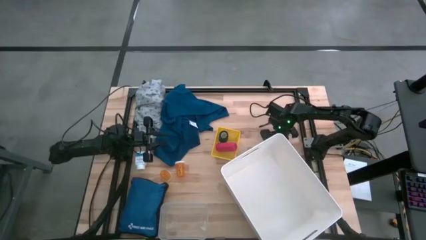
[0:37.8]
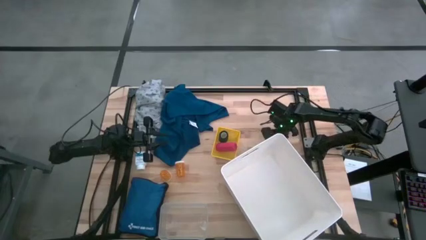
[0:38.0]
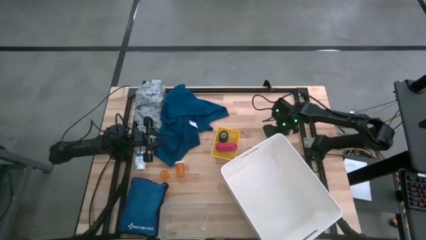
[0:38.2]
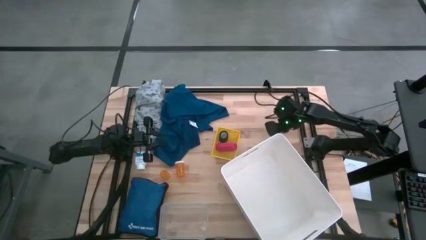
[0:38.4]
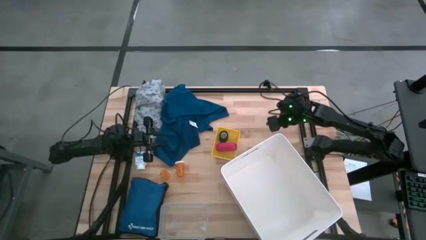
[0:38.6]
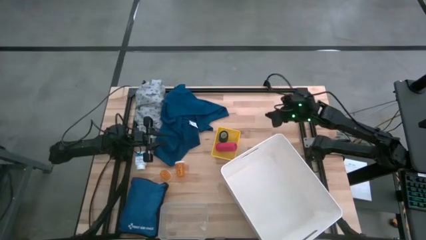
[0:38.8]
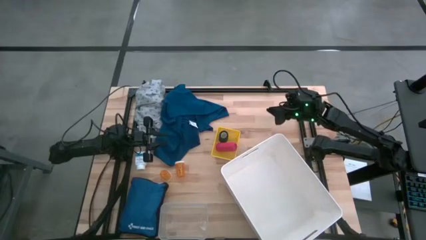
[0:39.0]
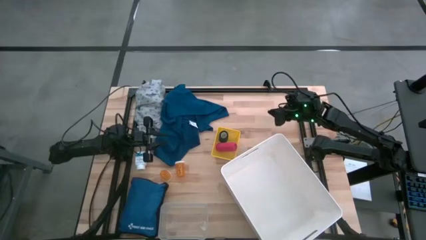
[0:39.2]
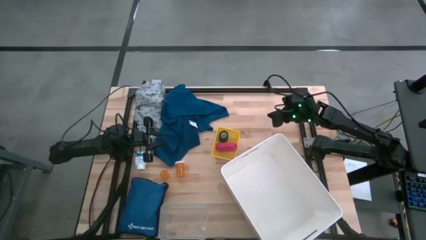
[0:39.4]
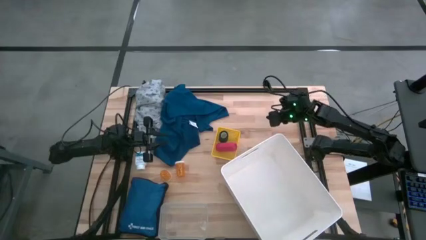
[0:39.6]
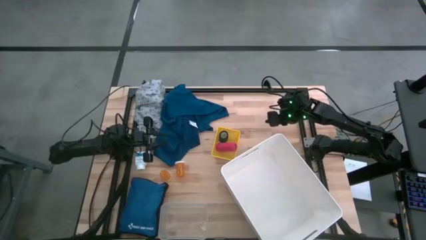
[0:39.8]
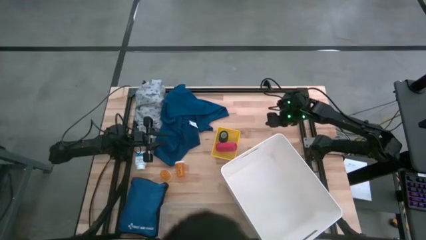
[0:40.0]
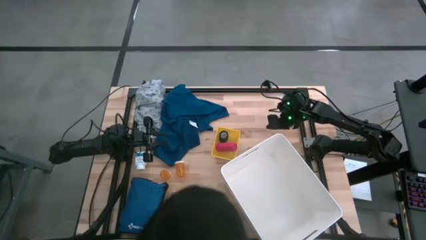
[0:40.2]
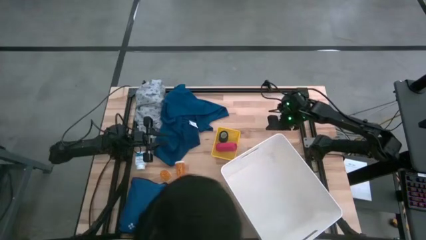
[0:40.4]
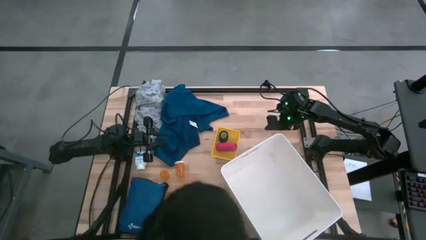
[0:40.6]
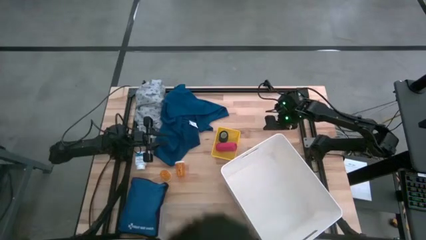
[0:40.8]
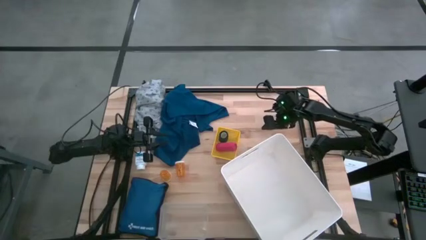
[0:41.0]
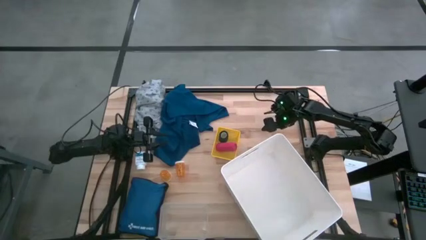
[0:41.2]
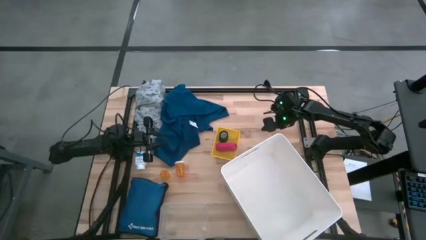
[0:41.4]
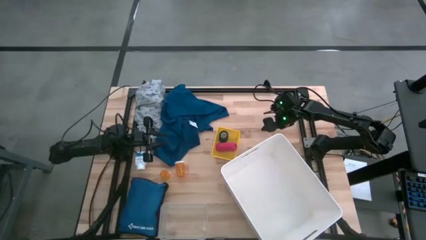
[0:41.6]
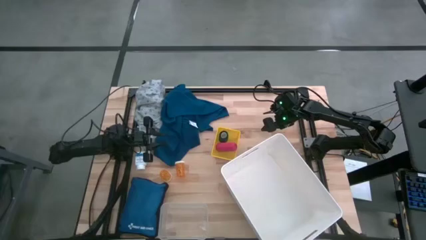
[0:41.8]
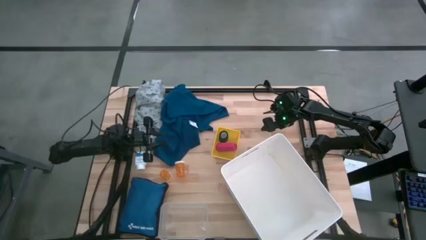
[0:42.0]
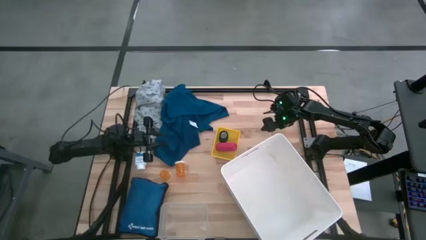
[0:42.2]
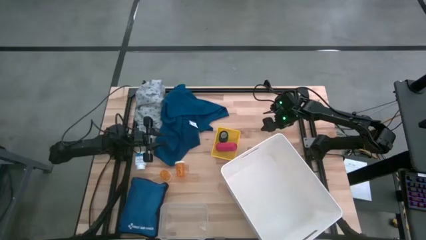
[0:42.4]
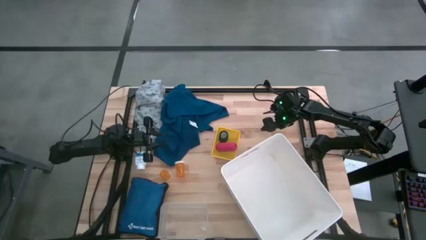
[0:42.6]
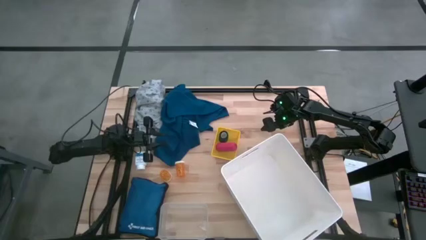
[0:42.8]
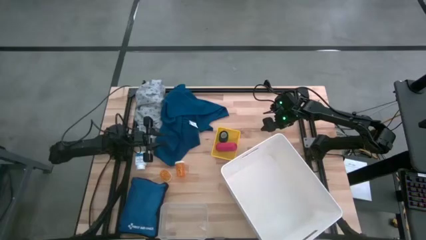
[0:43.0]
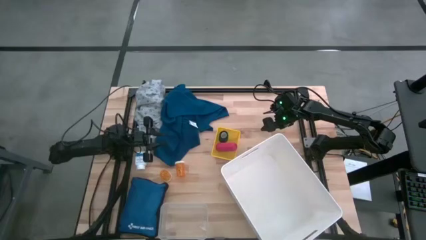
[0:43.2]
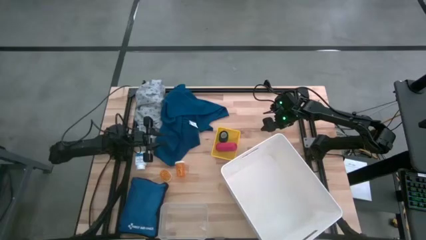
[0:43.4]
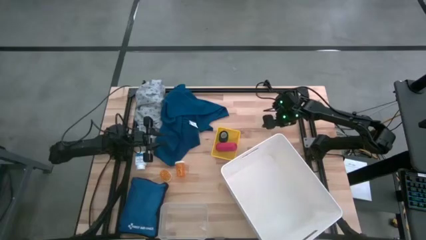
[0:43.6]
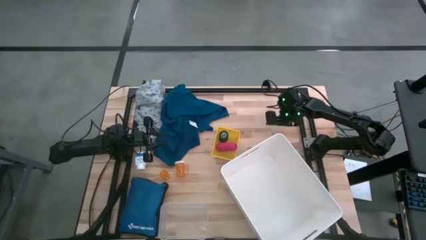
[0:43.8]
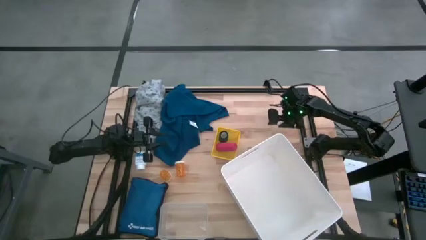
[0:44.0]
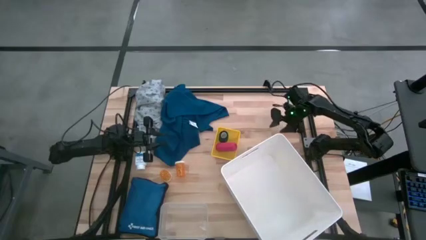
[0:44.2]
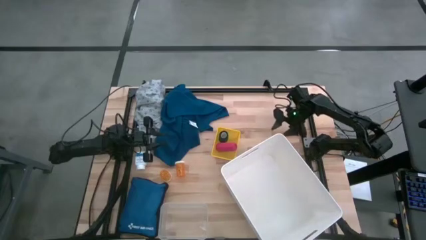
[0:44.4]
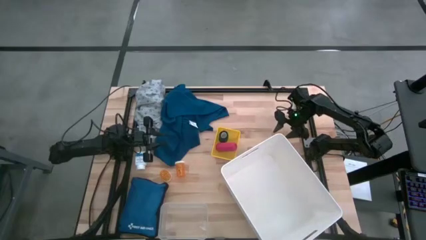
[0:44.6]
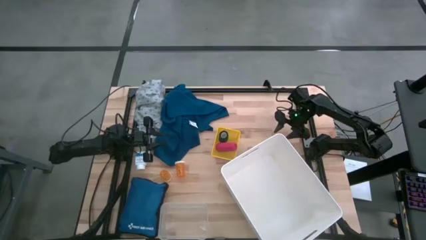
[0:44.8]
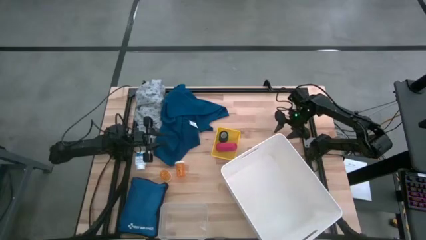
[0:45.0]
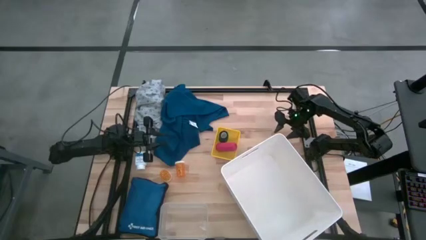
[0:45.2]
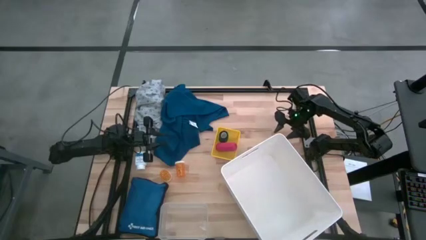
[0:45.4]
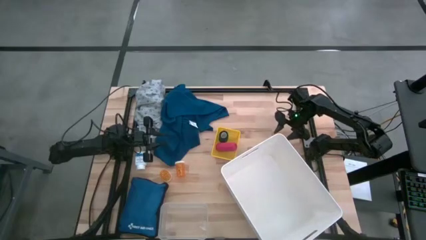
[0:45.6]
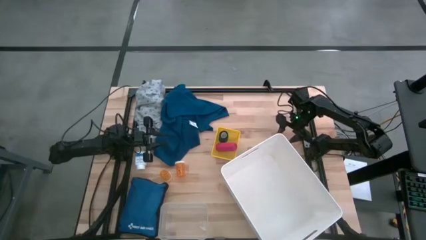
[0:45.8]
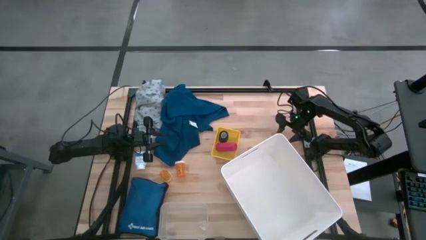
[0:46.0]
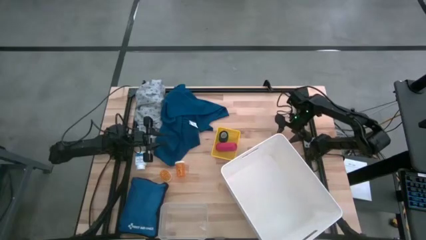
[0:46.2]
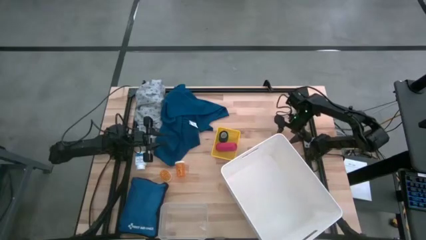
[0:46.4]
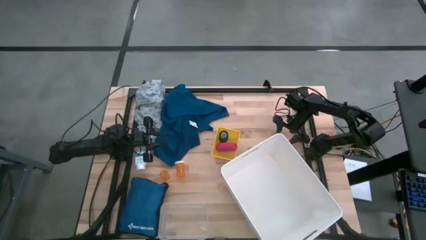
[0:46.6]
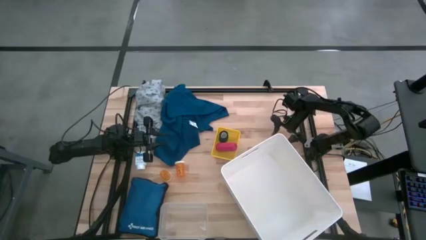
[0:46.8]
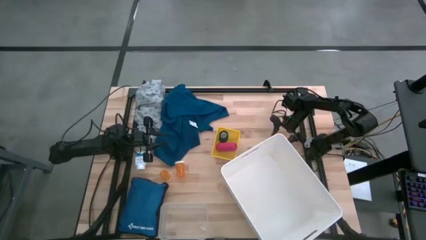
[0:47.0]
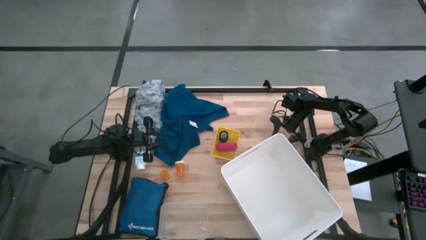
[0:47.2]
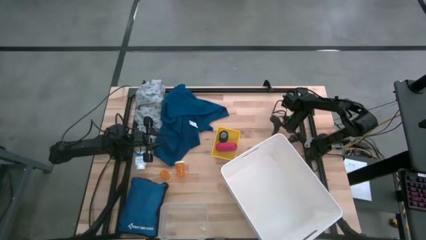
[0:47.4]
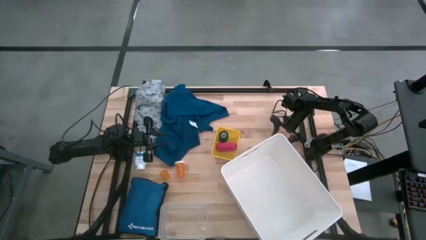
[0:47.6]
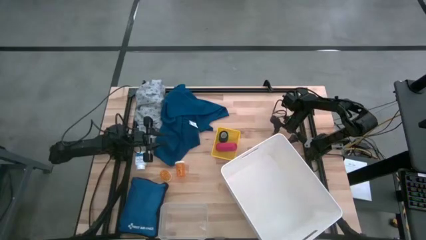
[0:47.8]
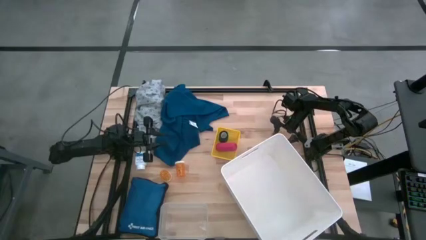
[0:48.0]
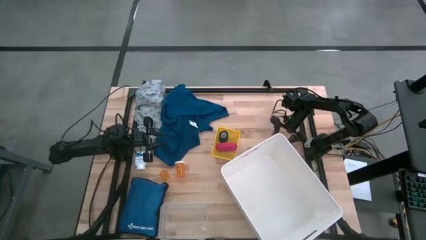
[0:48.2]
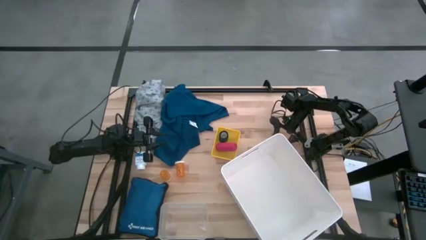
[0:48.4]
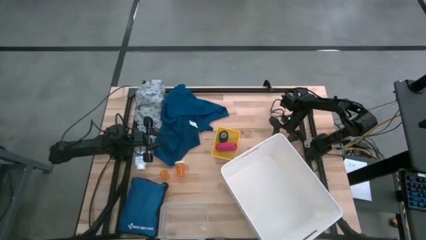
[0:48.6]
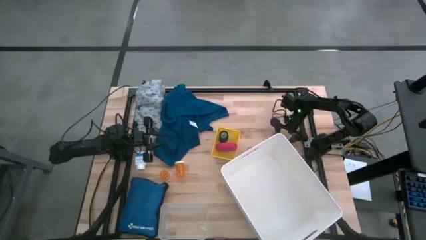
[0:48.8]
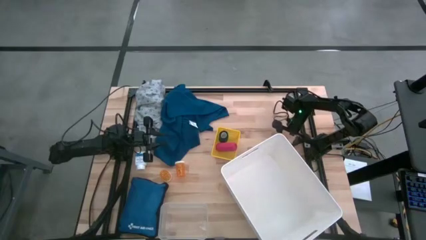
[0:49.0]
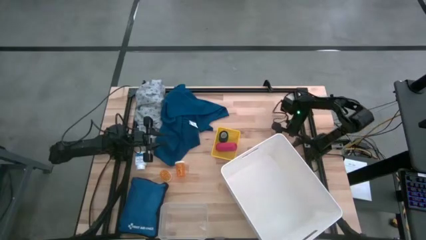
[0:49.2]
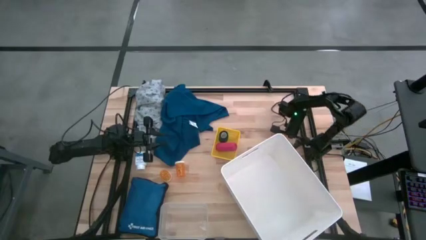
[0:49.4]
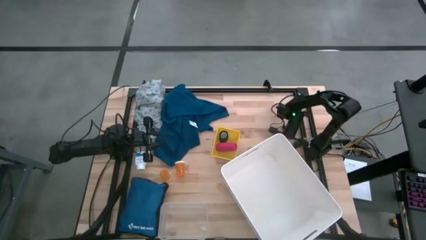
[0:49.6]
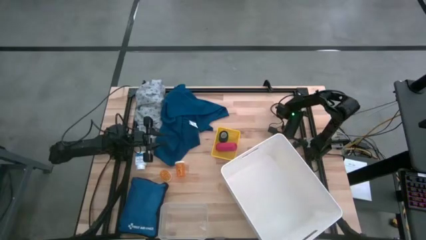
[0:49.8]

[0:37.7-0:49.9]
Task: Pick & place medical supplies in basket/bin
Put the light blue bandage into the yellow bin

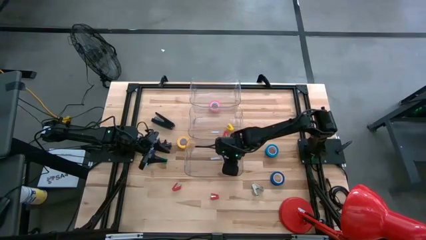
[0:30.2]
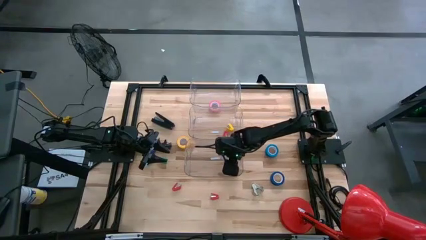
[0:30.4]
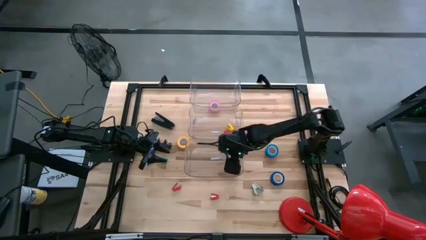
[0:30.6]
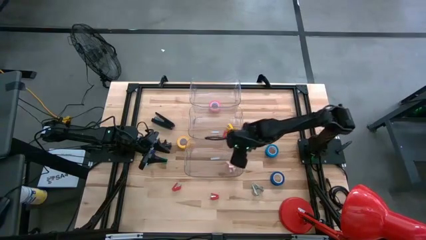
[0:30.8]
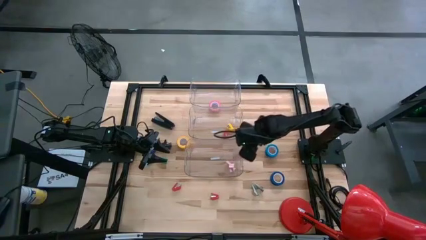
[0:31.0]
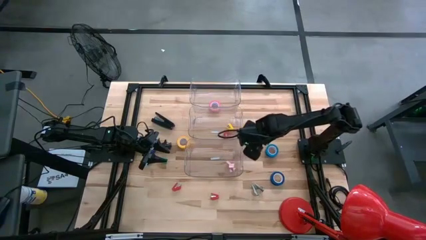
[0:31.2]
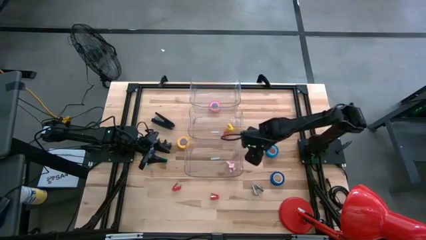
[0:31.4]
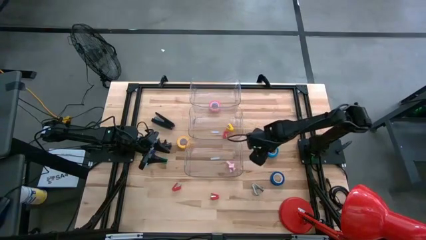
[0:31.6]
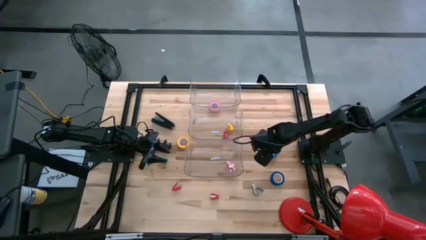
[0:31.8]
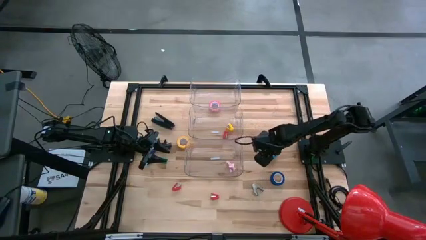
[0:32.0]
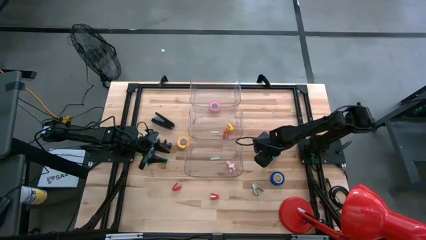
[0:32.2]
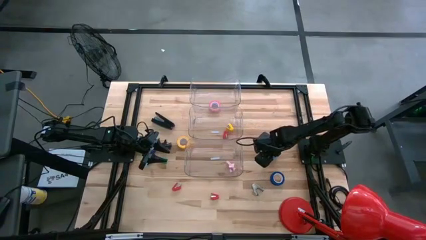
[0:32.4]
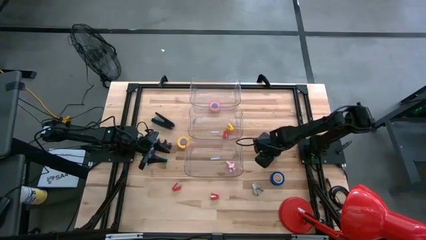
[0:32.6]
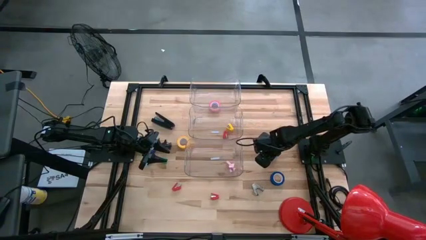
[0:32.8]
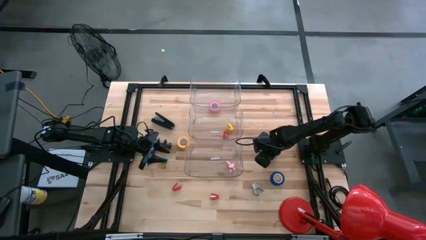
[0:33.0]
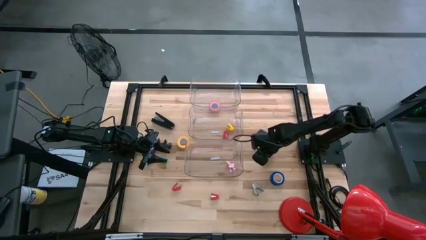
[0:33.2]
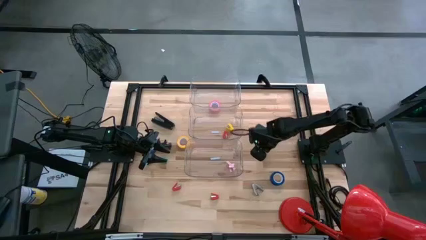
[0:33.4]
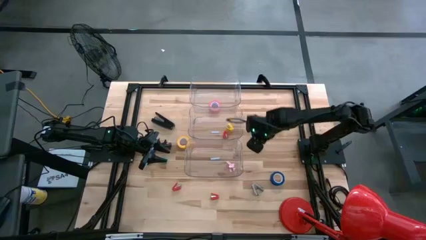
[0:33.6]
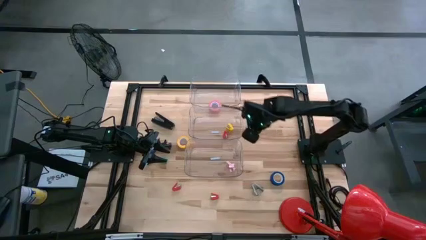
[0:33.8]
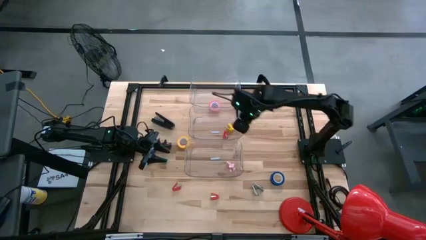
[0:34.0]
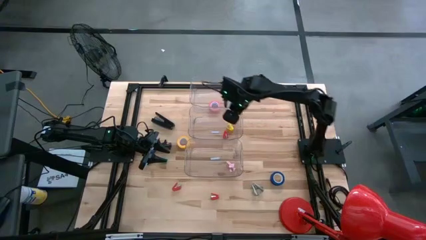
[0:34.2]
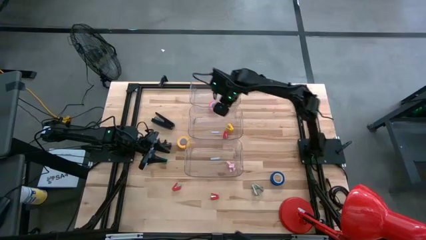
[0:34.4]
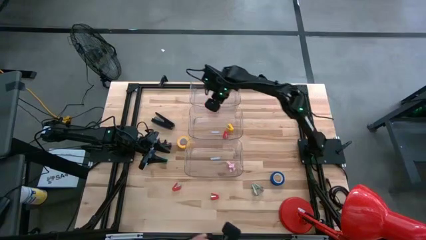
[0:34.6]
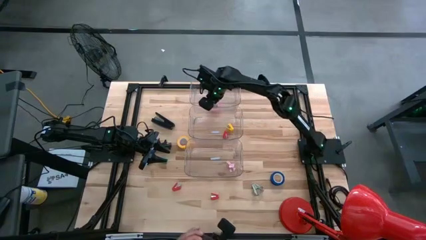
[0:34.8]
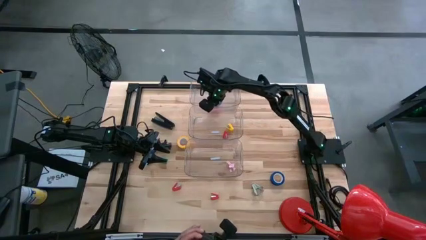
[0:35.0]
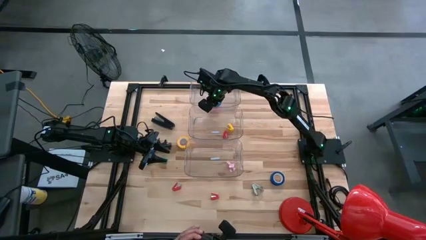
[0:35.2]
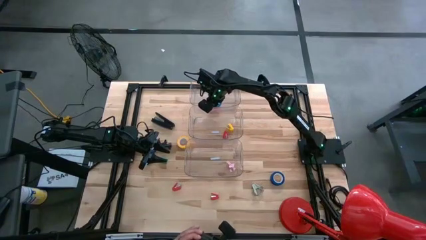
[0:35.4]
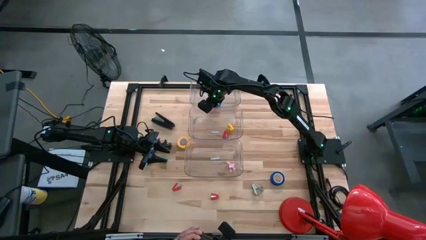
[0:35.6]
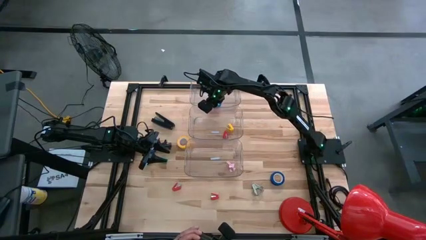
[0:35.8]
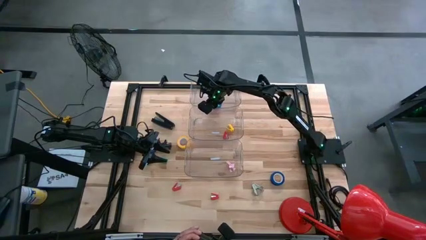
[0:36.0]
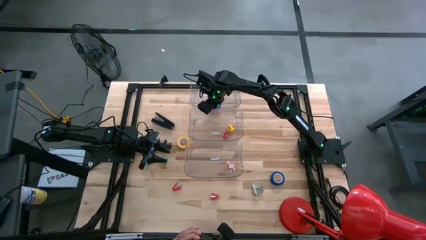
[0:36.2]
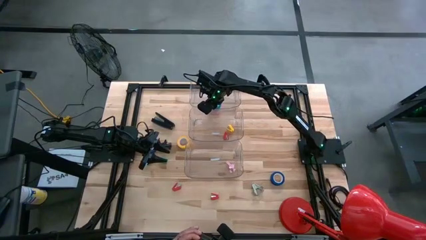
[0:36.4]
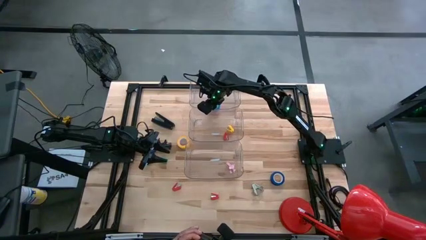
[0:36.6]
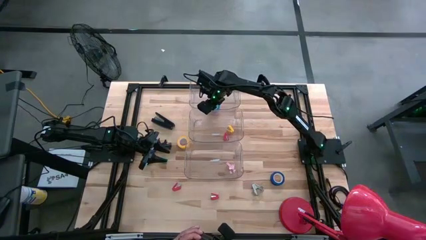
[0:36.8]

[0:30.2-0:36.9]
Task: Pick and place Stapler, Stapler remover, tape
Put the blue tape into the top transparent bin
